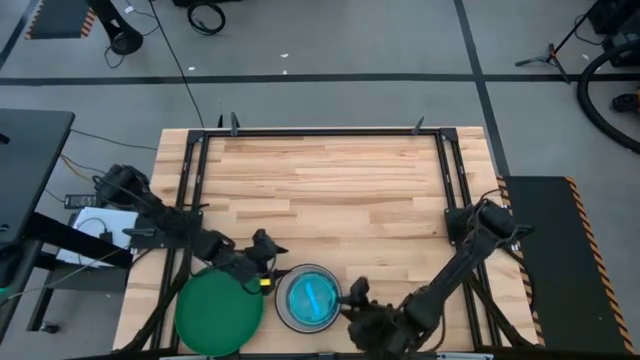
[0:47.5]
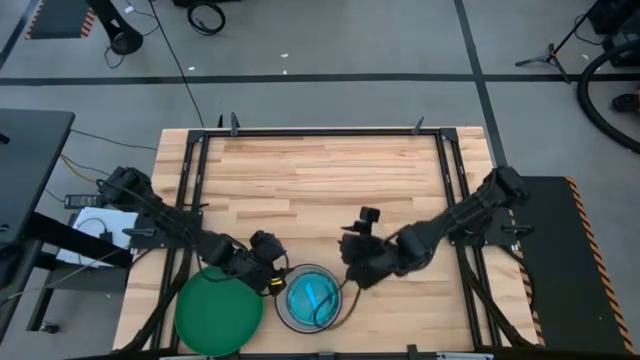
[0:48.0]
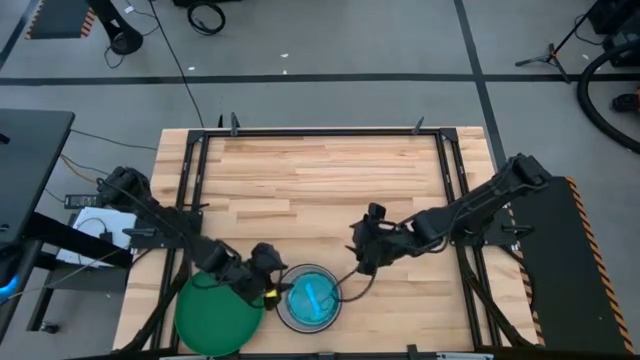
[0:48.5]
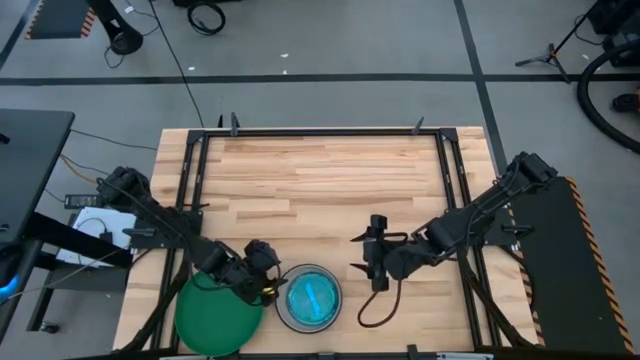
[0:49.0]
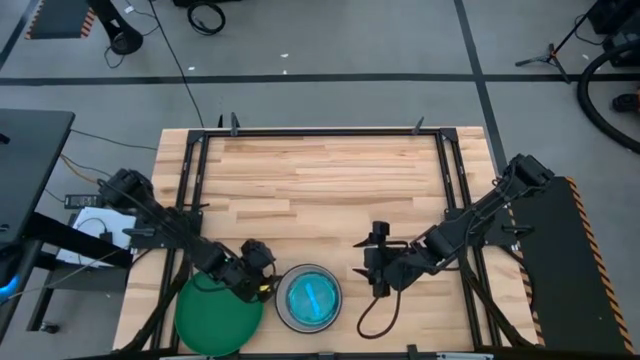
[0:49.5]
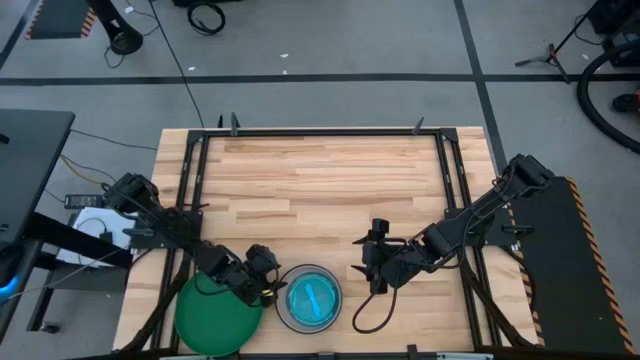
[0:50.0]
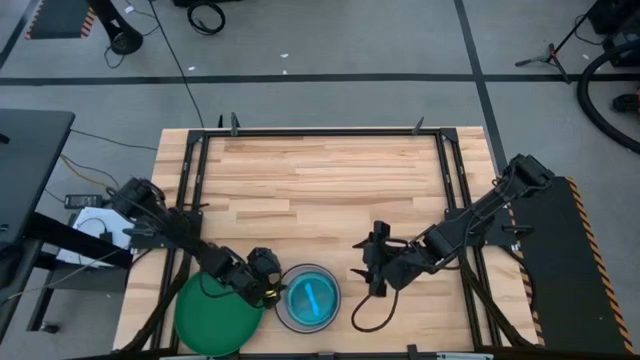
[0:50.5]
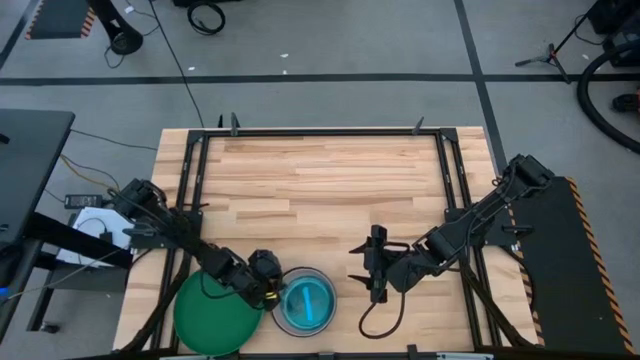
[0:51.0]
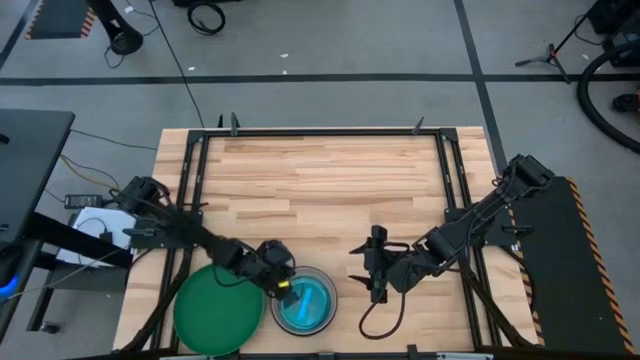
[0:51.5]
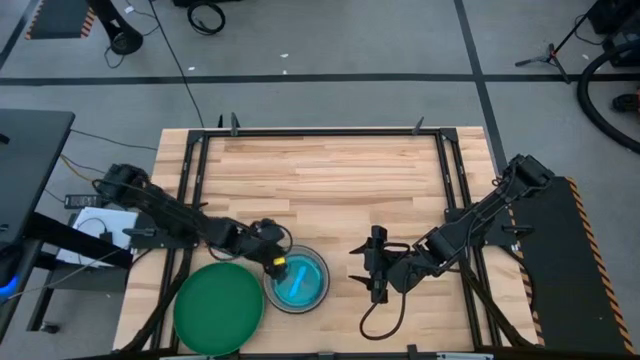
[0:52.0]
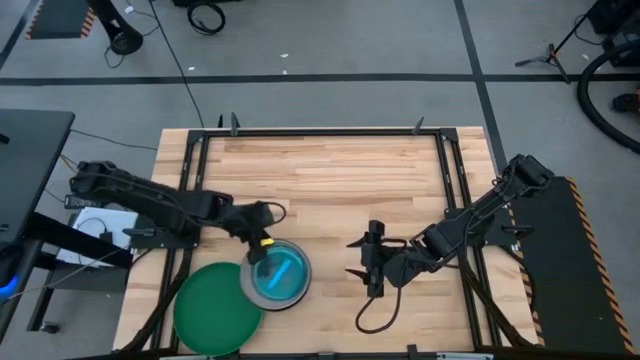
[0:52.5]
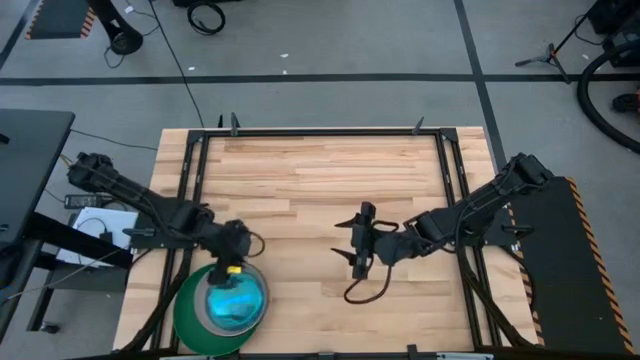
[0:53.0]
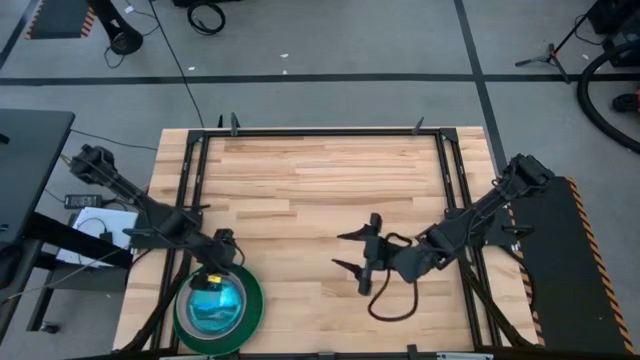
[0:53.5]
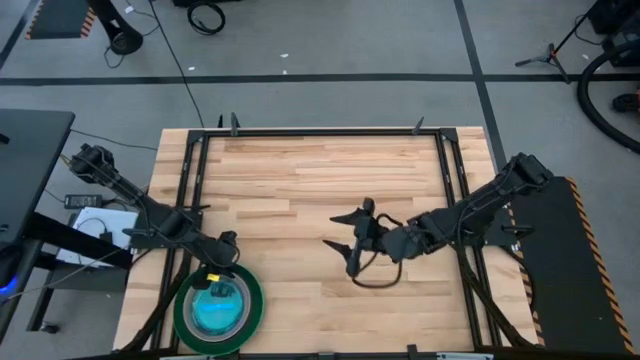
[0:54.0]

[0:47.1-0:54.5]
Task: Stack plastic plates
Stack the right stacked plates on top of the green stacked plates

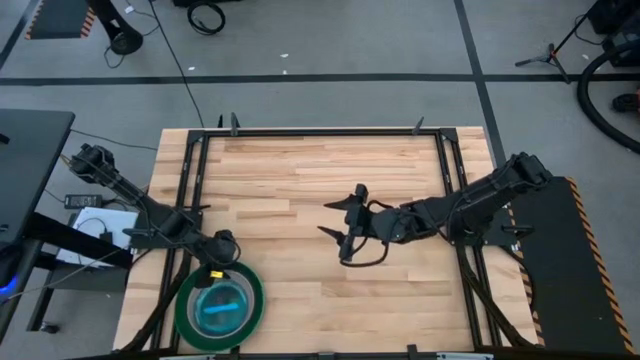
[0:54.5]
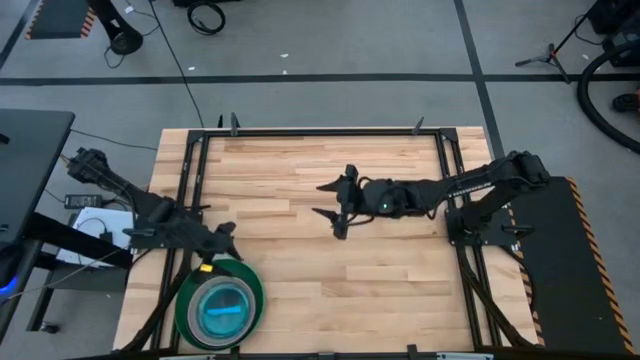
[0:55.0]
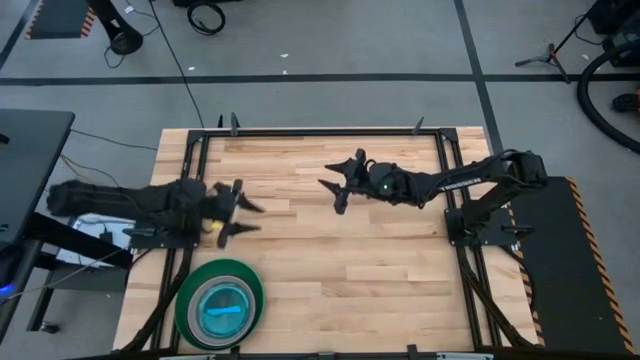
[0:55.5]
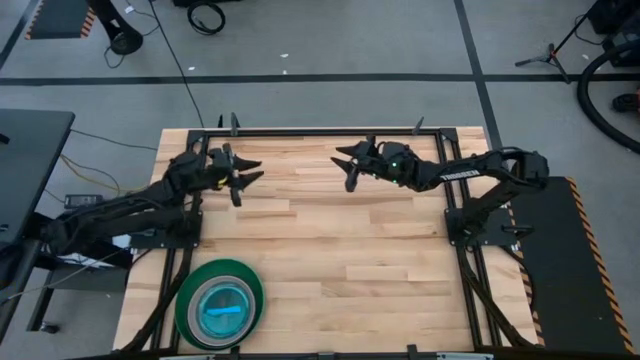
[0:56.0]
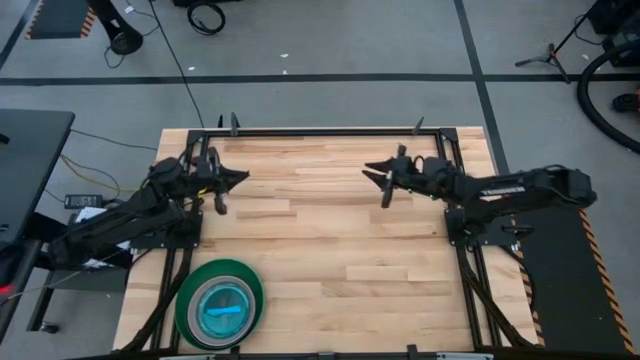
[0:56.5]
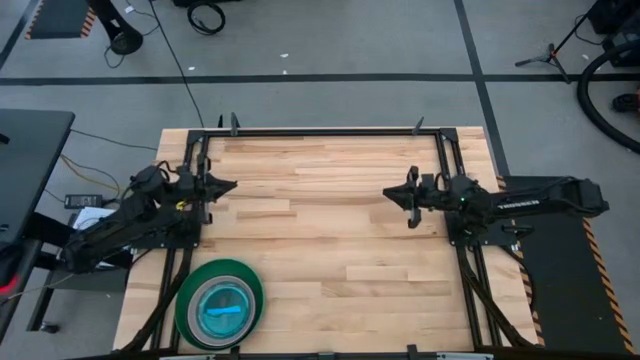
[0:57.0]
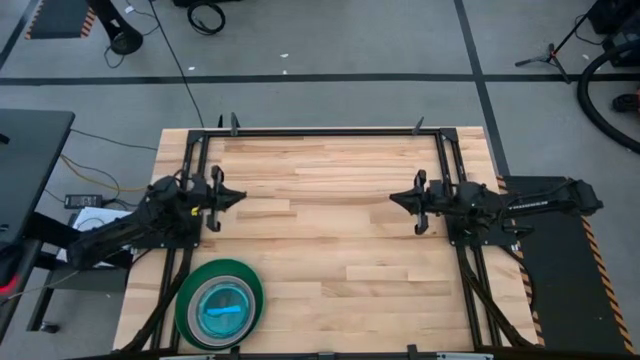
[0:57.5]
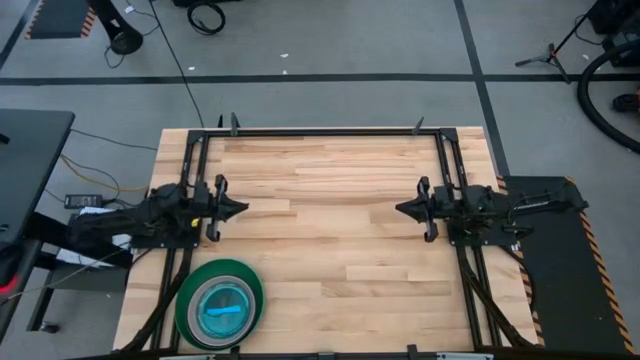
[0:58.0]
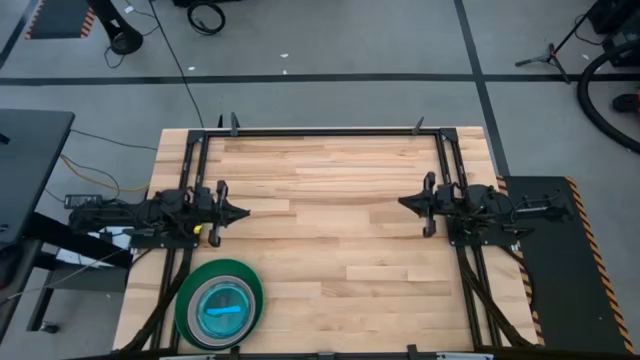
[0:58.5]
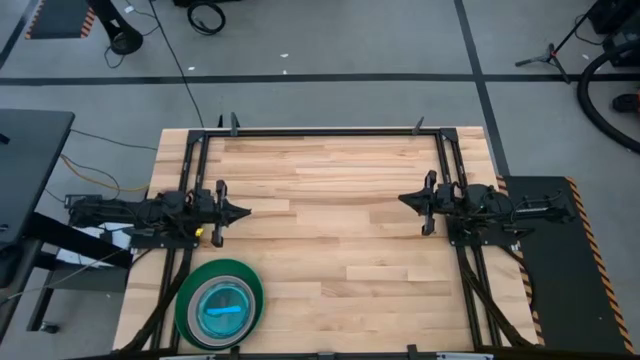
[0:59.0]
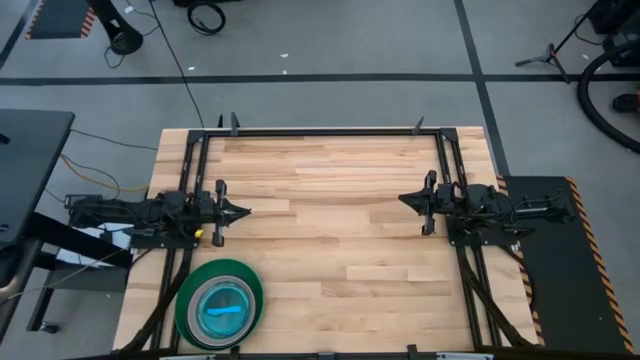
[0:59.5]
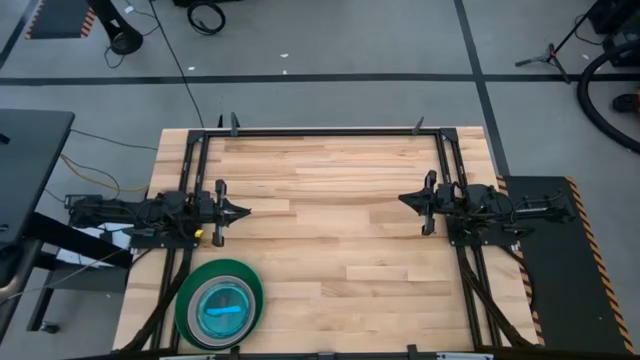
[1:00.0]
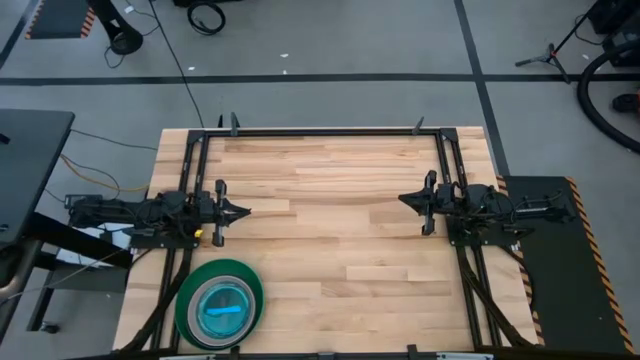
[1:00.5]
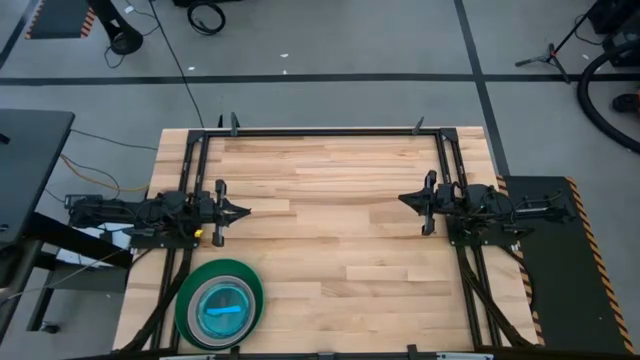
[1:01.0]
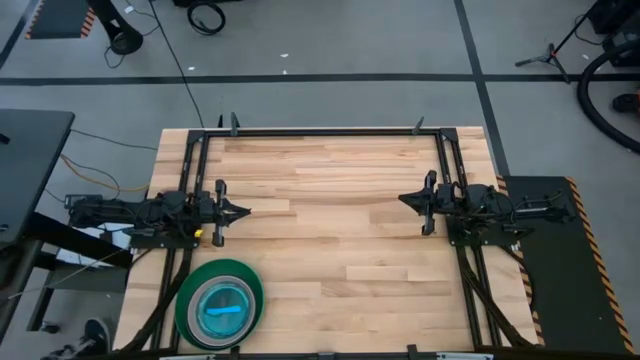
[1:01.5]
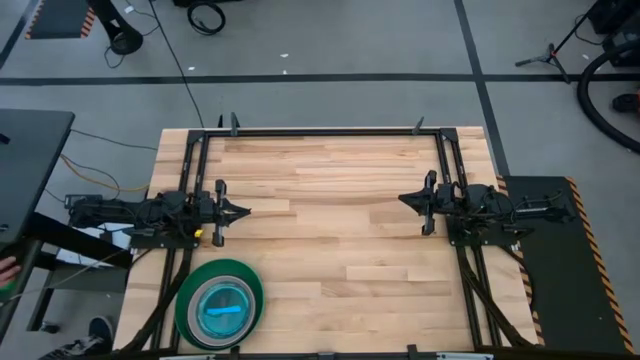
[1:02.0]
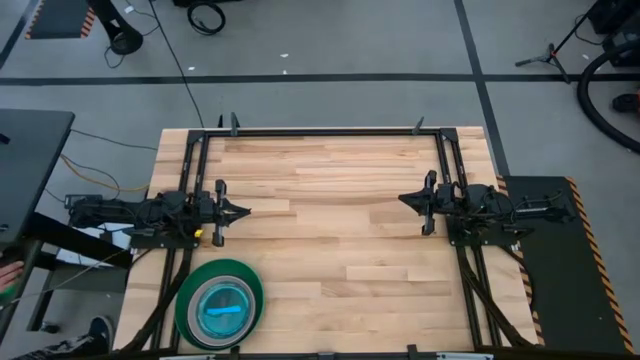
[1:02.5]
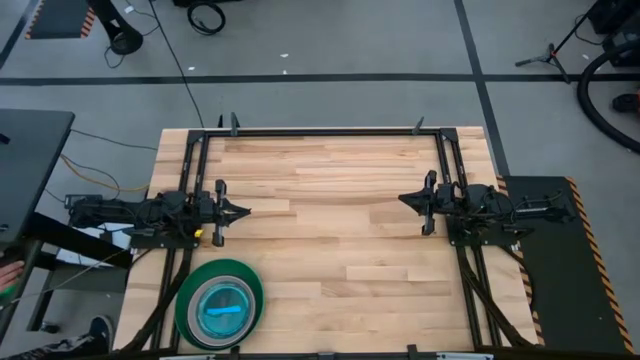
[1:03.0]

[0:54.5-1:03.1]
Return to Home Position

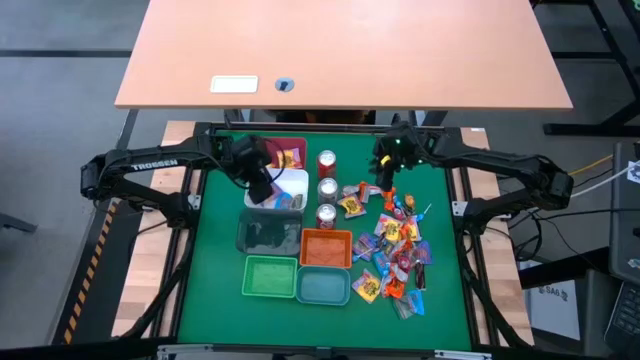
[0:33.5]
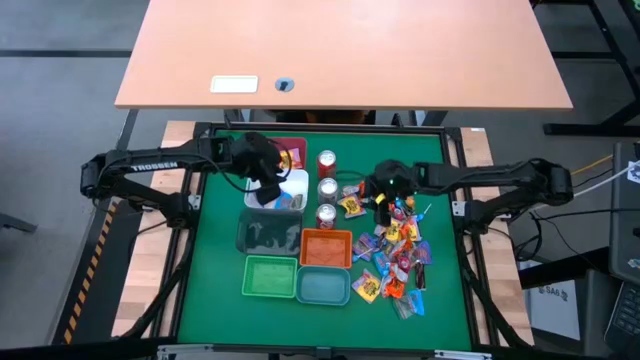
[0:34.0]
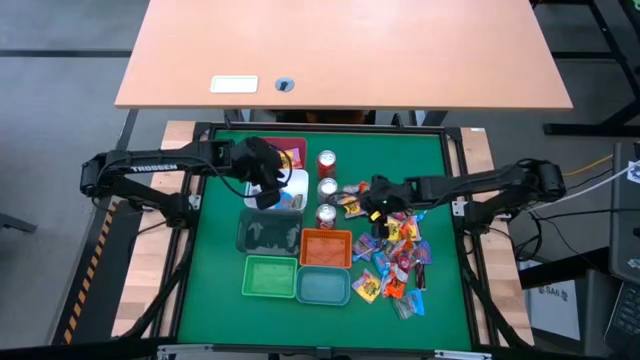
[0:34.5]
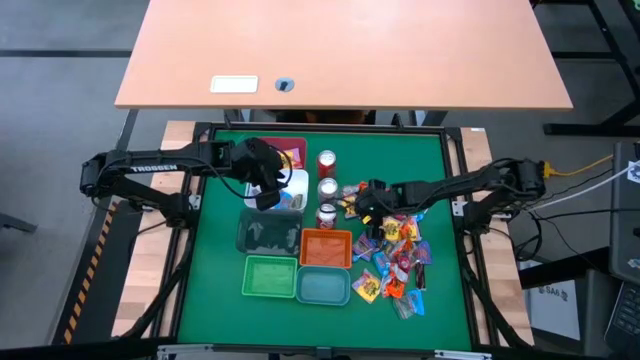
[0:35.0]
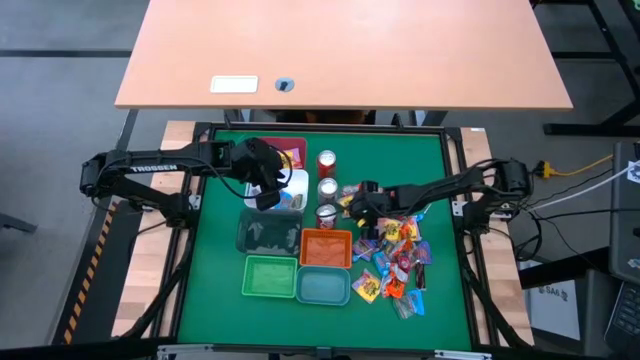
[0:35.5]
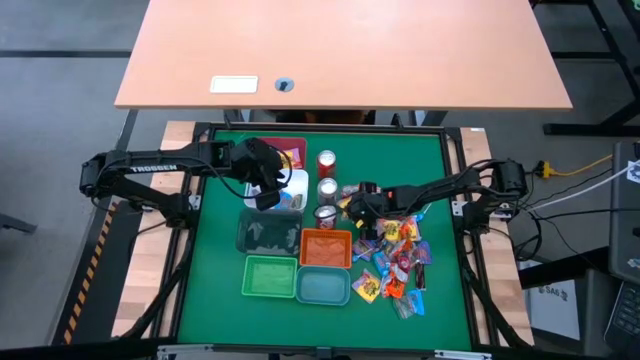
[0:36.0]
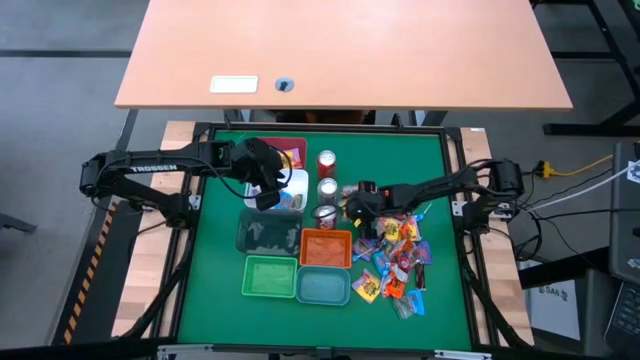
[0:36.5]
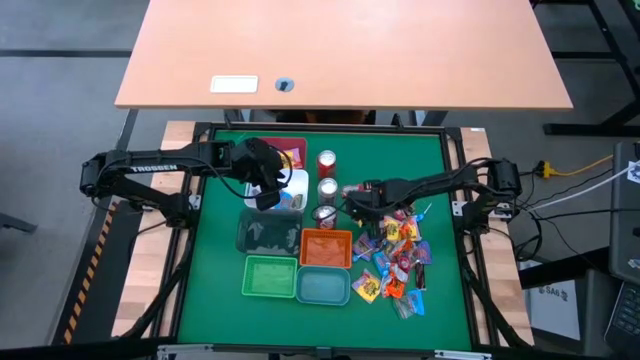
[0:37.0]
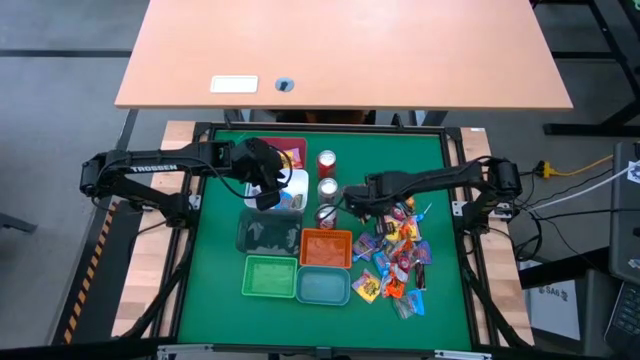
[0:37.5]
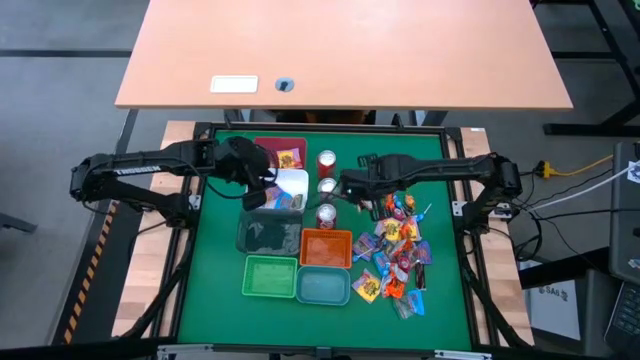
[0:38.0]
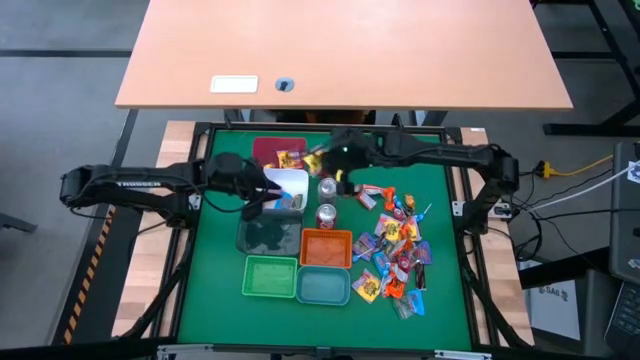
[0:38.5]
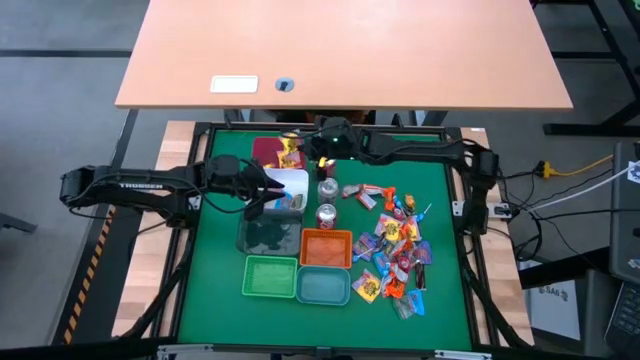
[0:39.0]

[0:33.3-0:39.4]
Task: Sort candy
Put the yellow candy into the red bin
